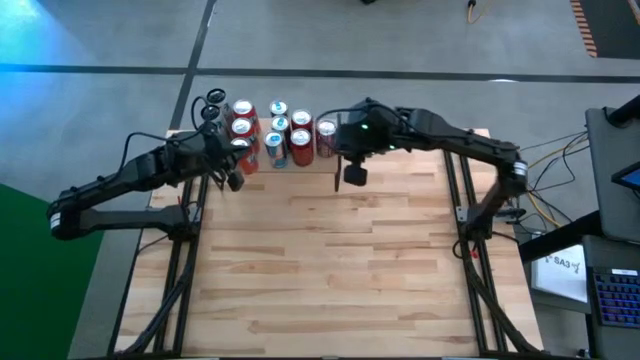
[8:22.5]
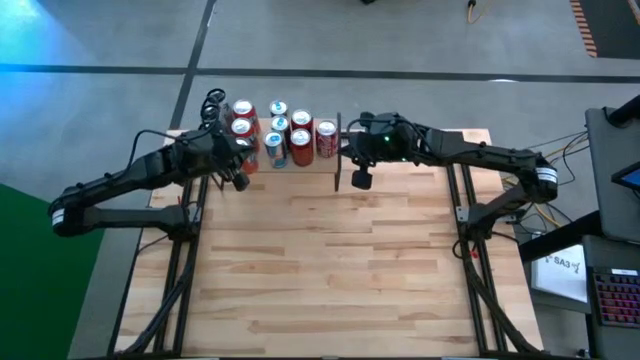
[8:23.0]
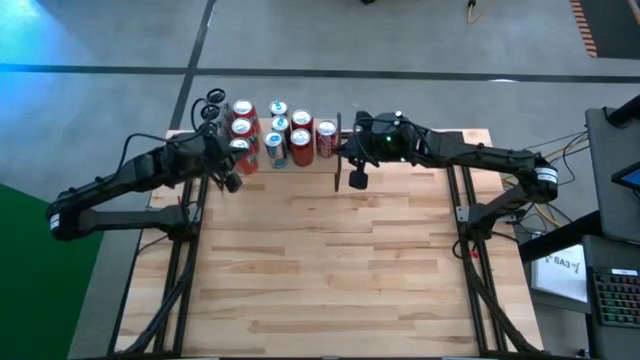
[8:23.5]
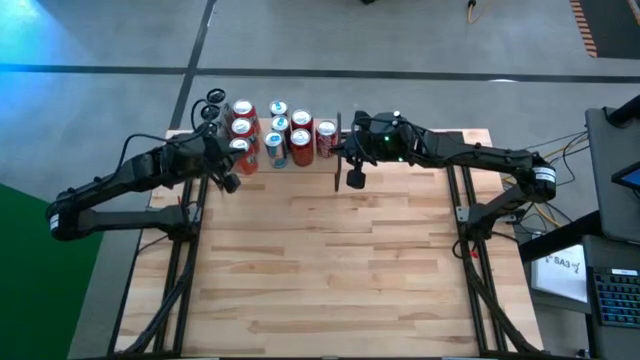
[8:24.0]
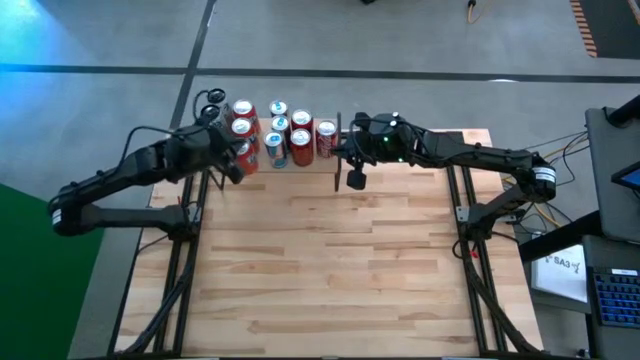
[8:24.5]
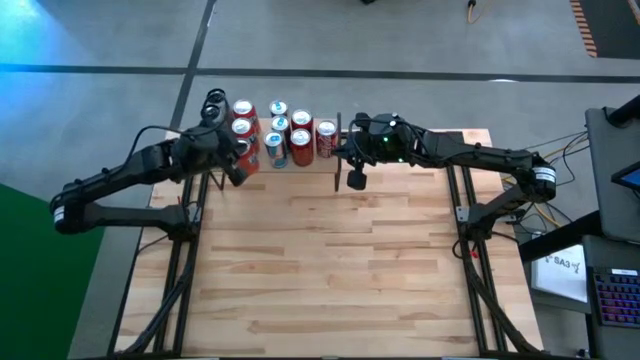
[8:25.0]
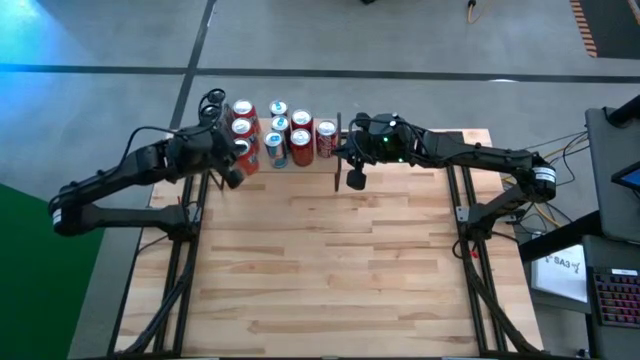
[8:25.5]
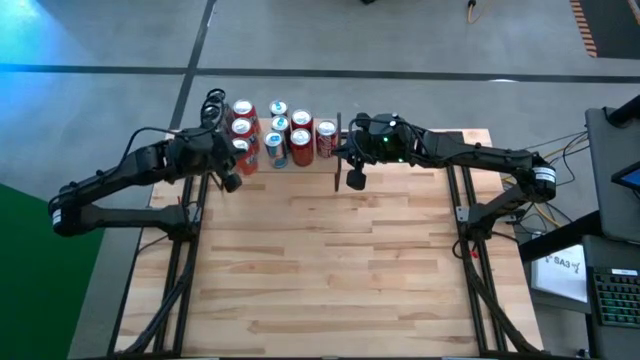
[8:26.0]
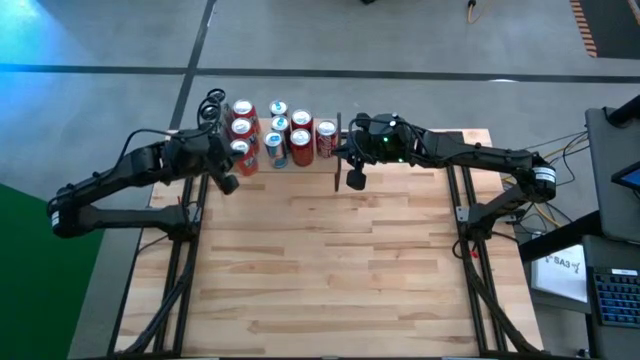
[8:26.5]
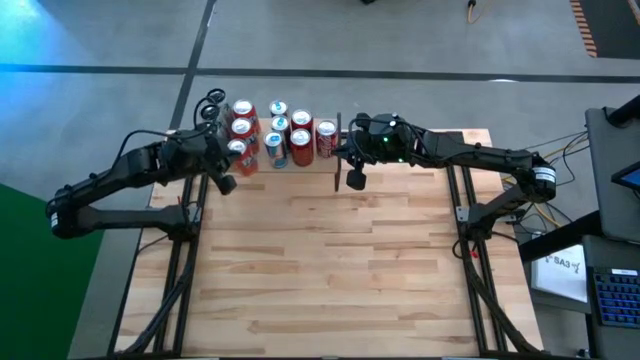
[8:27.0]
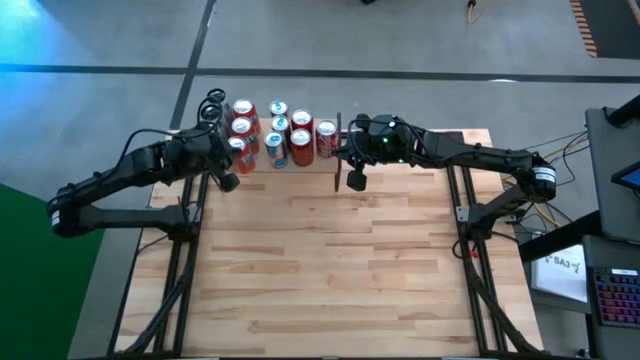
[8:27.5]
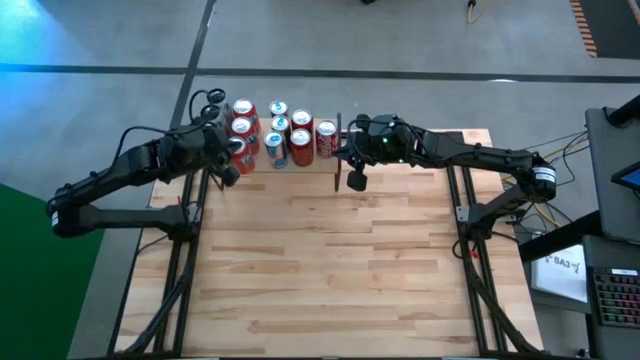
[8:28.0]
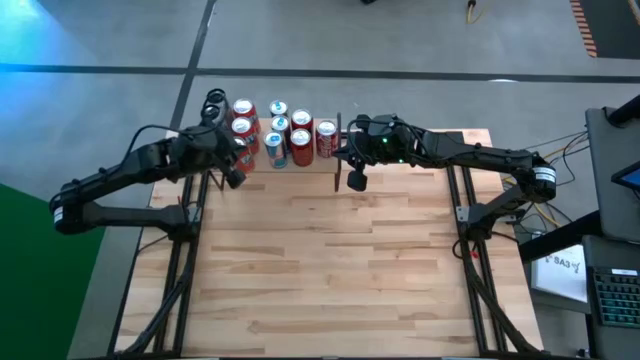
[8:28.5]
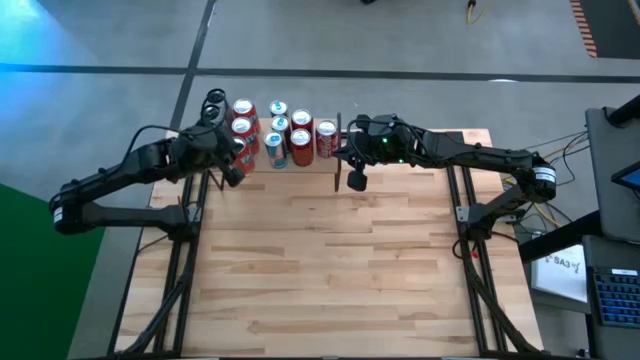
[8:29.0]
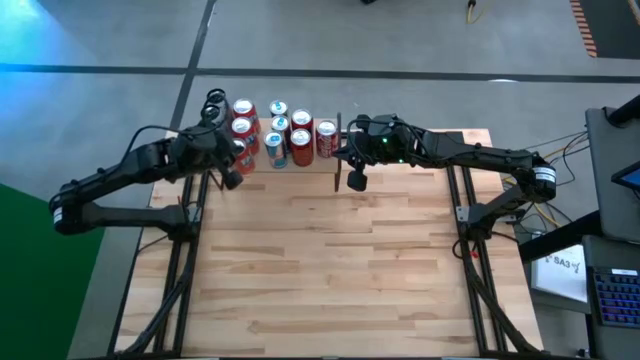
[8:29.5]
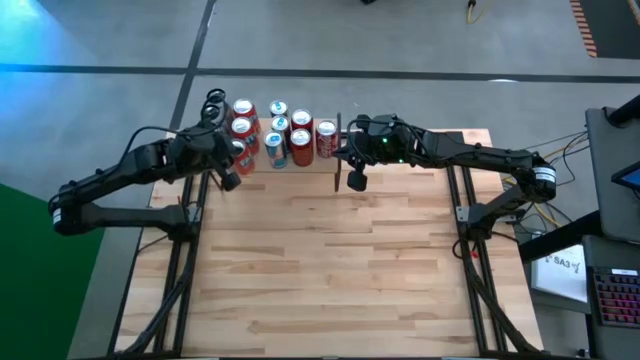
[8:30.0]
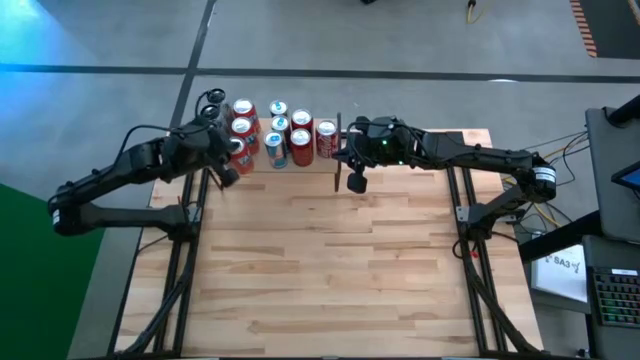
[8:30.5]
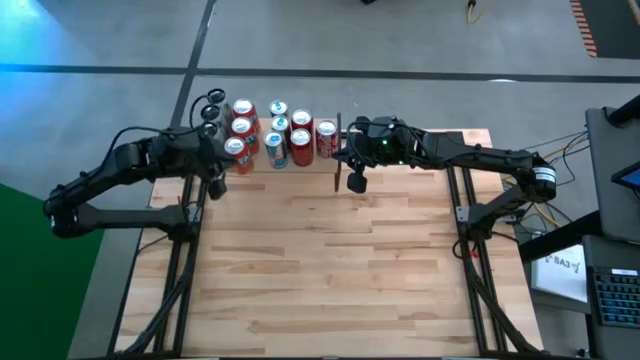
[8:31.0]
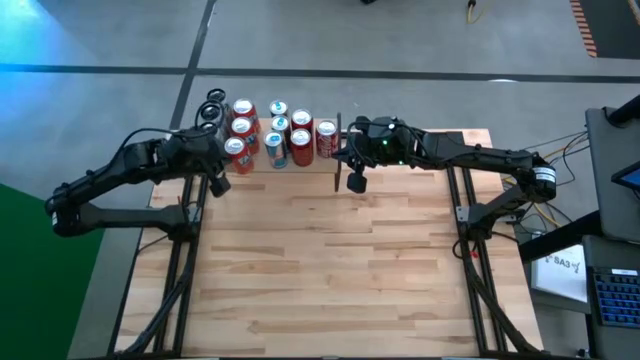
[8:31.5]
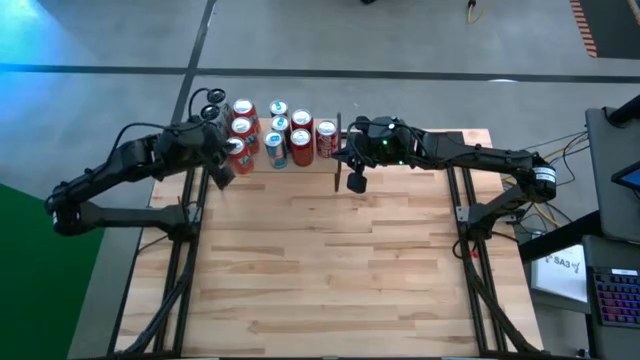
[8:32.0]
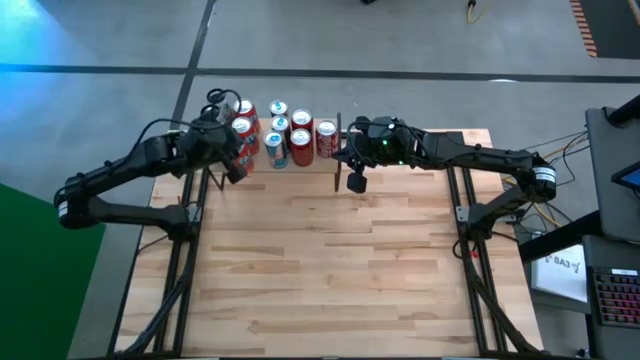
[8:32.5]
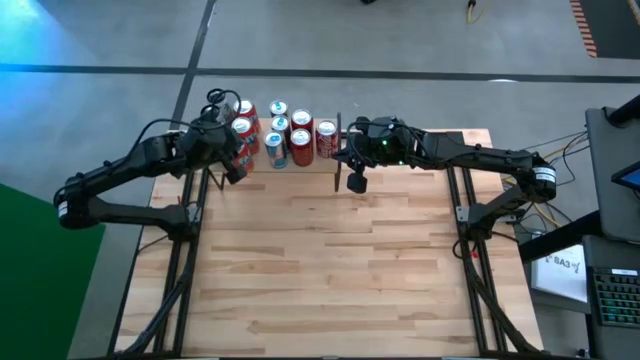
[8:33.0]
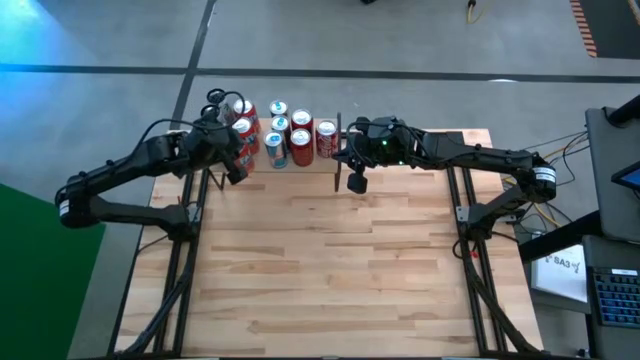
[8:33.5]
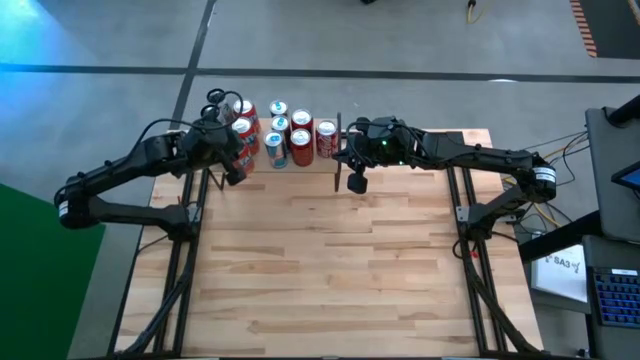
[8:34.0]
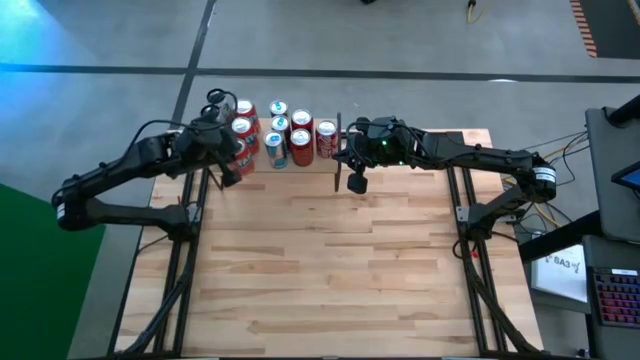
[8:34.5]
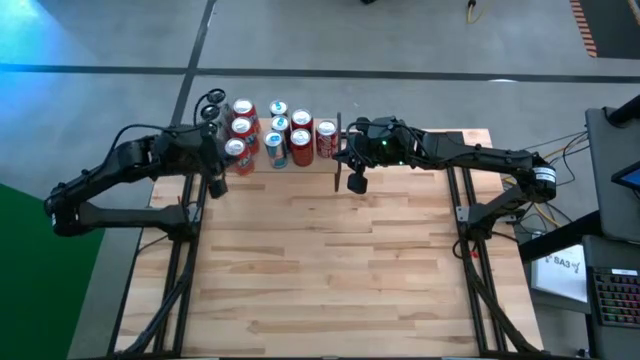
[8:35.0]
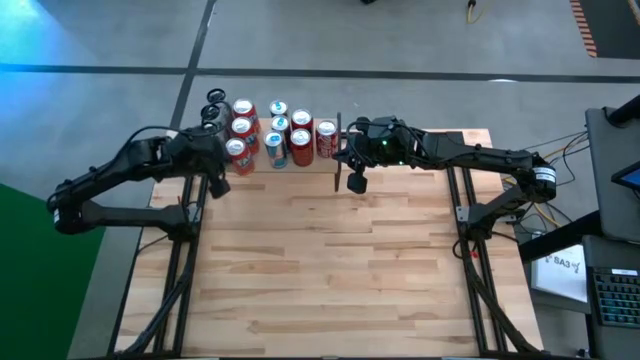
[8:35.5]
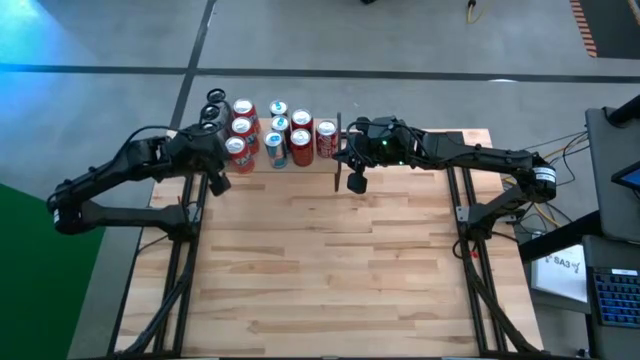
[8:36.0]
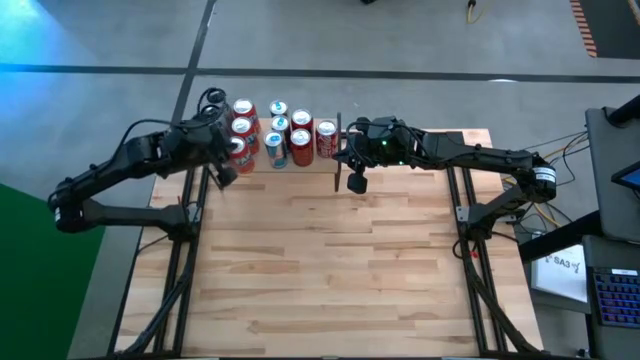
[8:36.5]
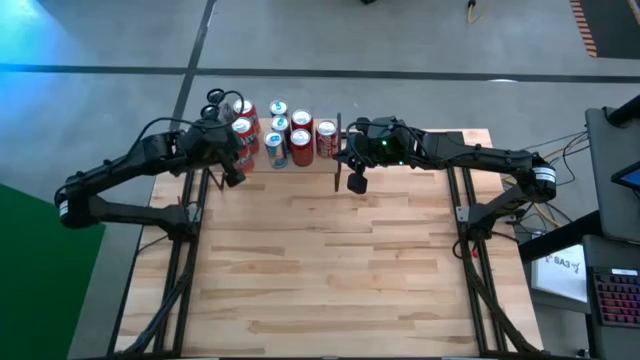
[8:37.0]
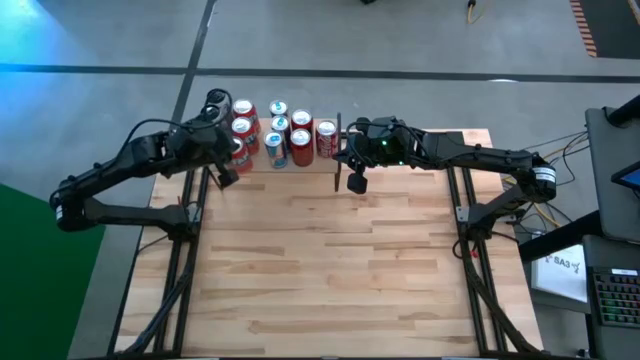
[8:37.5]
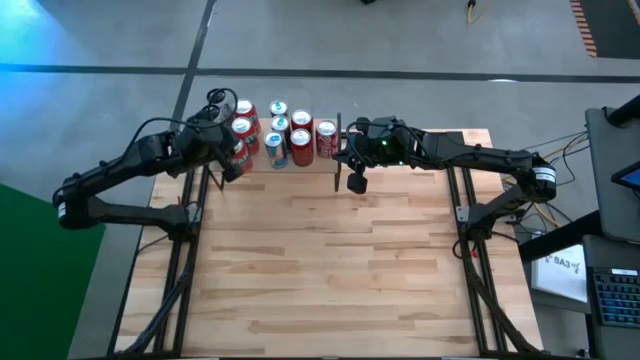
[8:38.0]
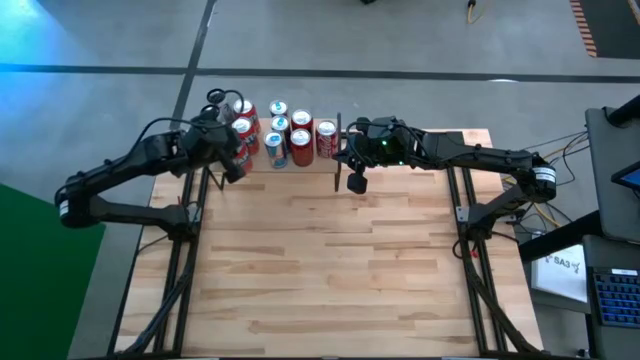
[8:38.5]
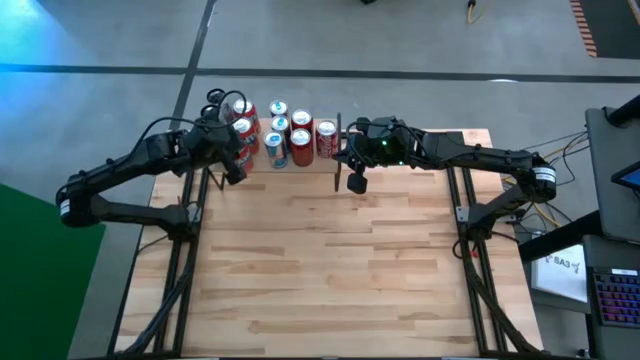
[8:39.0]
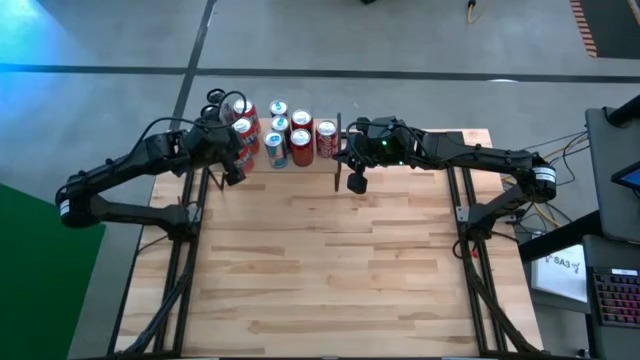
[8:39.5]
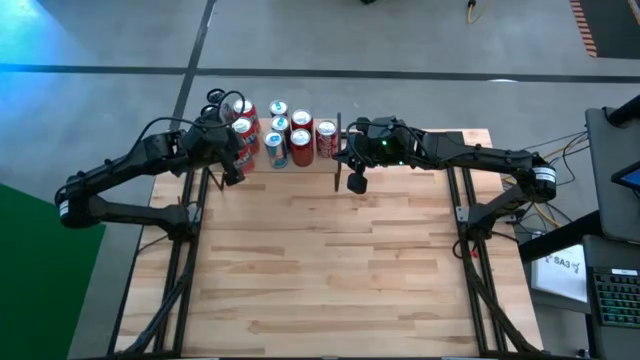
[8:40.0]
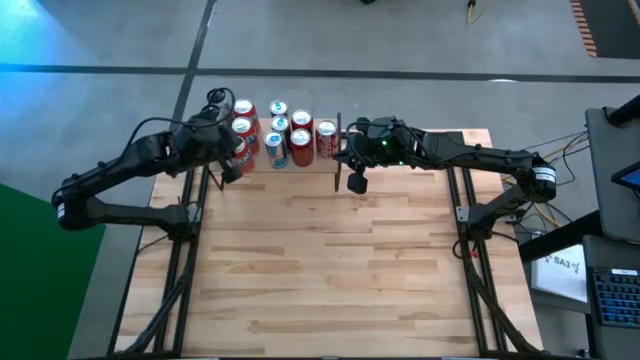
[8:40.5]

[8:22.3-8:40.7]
Task: Place canned beverage on shelf
Adjust the red soda can on the shelf

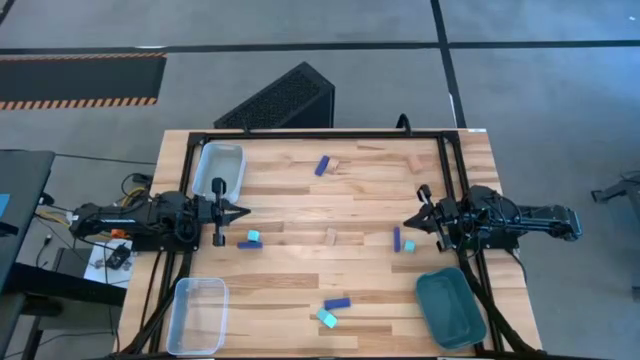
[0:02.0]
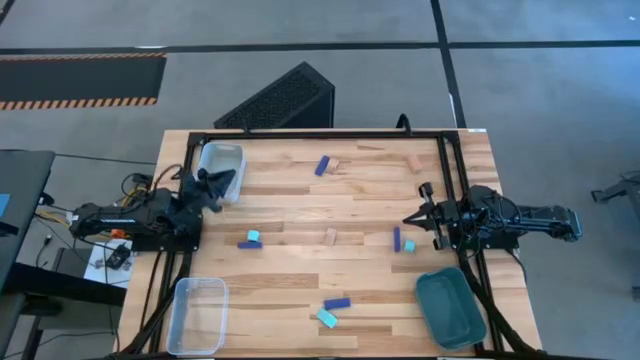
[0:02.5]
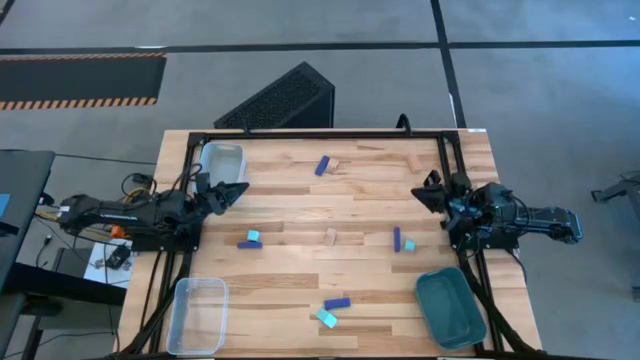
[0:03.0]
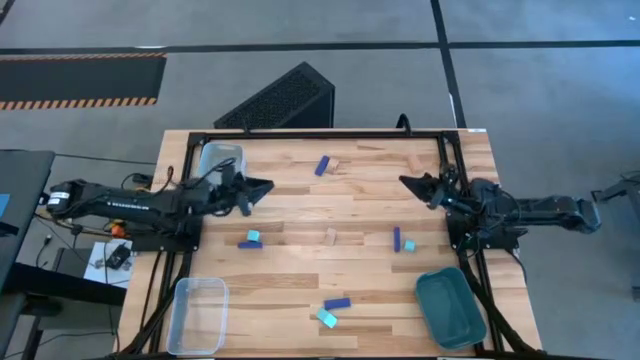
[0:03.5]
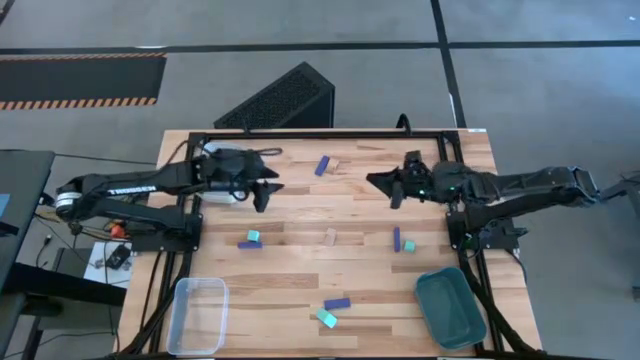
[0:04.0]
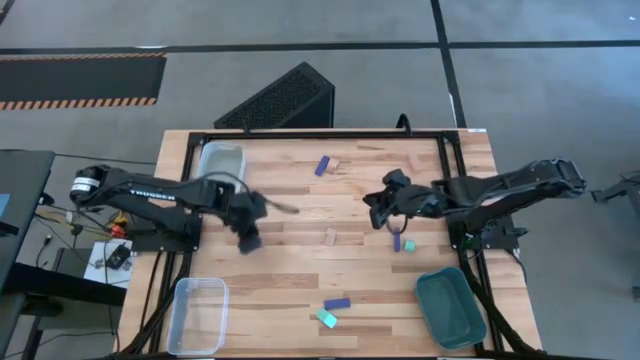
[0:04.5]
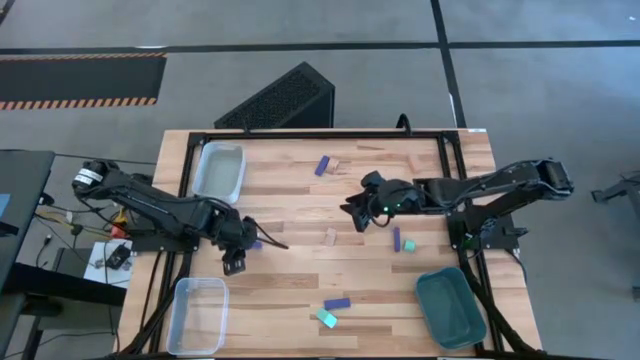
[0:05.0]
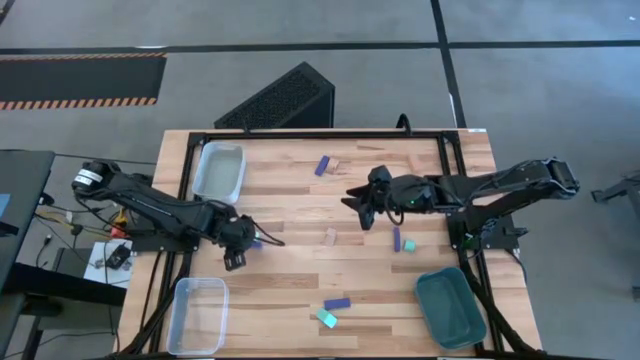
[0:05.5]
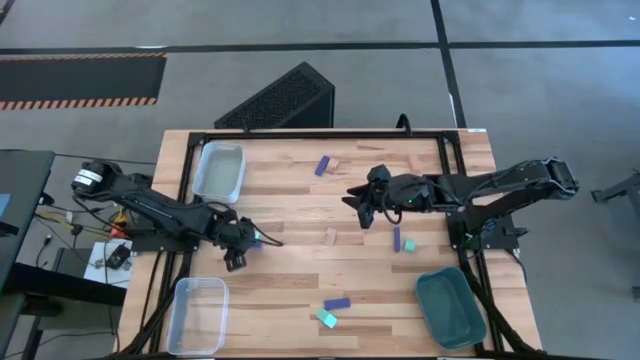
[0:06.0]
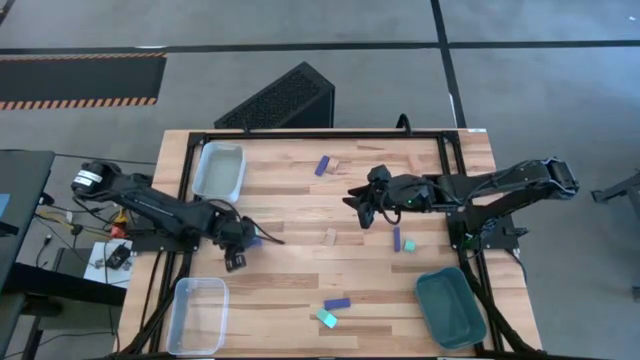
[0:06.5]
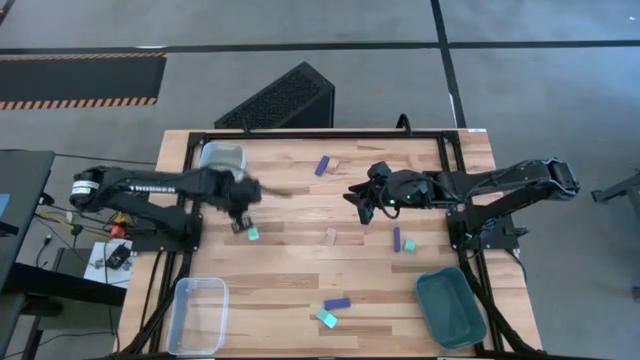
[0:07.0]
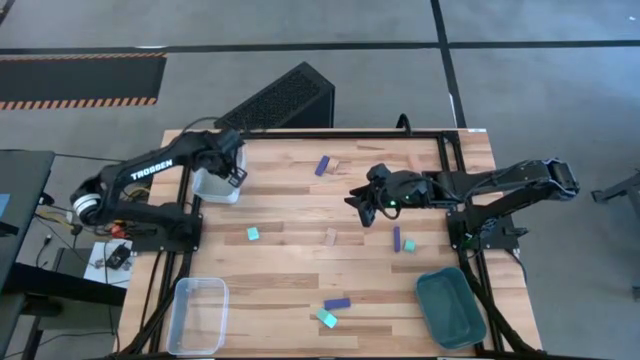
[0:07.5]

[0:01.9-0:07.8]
Task: Sort & place blocks by color
Put the left violet block into the white bin
